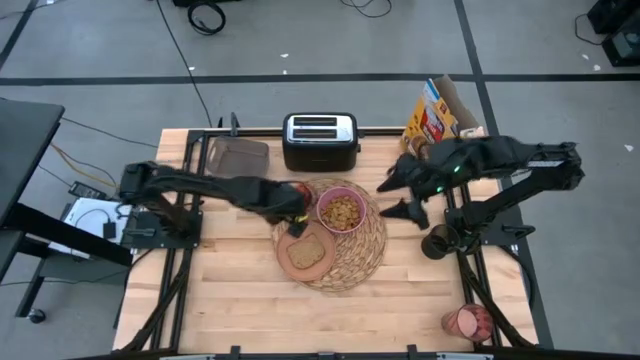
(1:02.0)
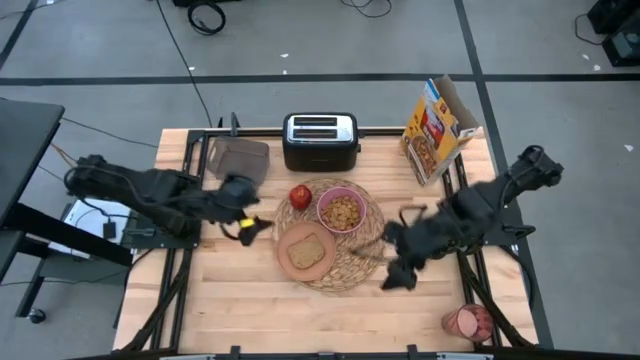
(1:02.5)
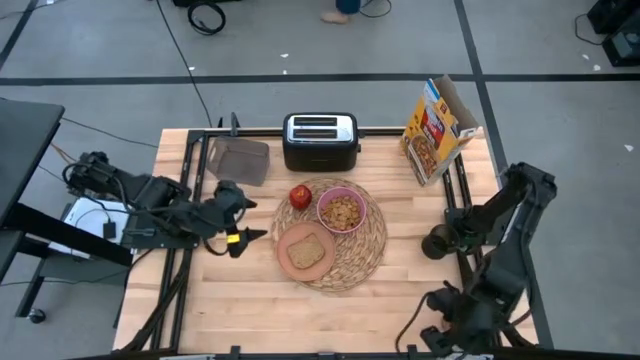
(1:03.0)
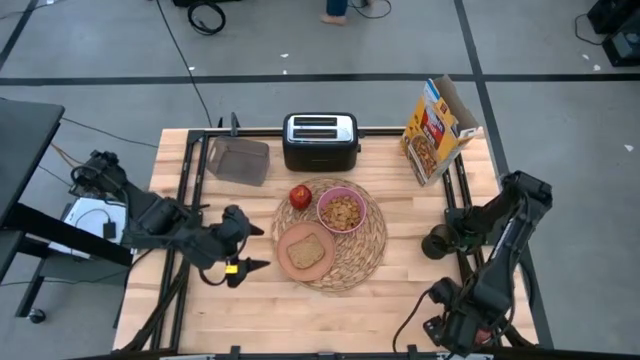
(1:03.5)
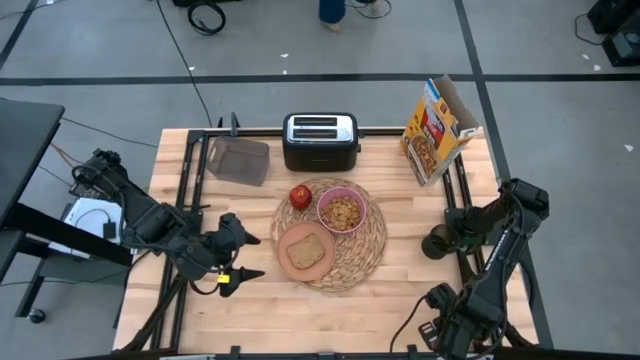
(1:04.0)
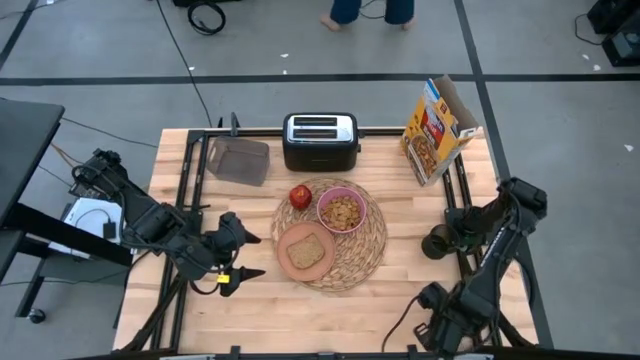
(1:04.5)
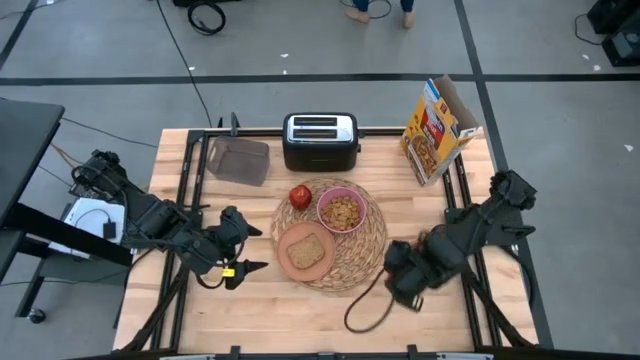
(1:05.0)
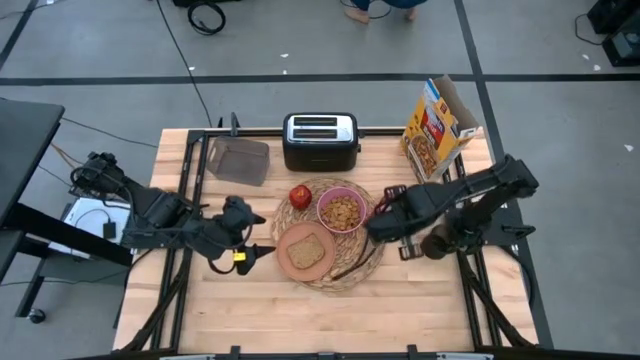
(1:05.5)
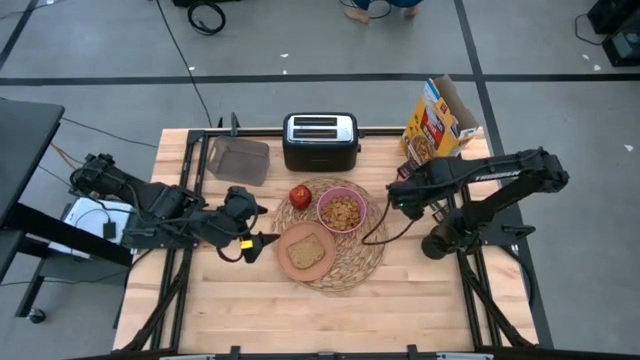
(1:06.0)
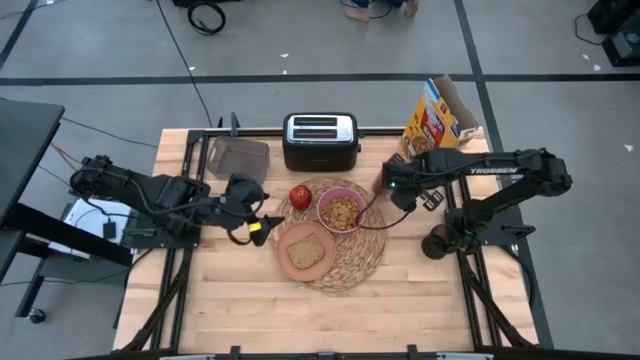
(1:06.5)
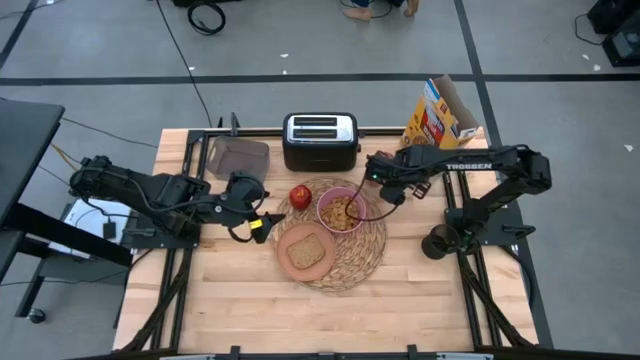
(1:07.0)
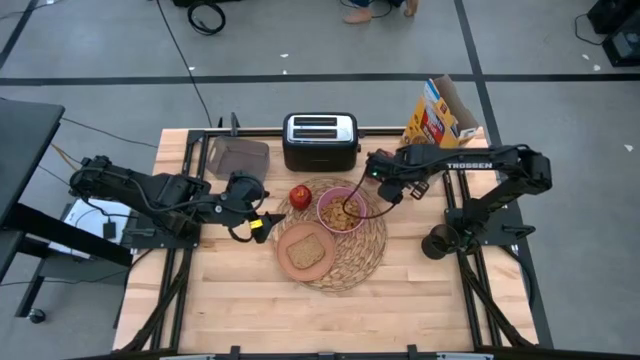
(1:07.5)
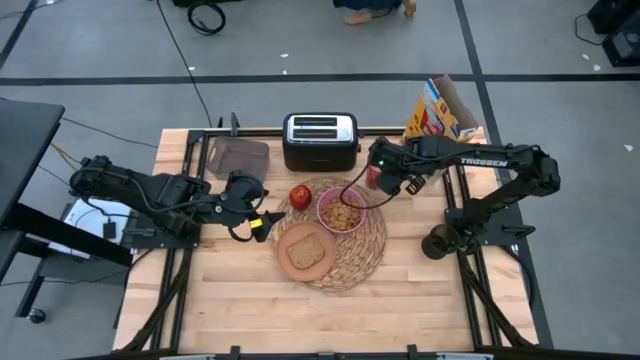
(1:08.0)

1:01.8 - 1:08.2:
Task: Arrange a breakfast setting
Put the red cup to the top right of the brown placemat

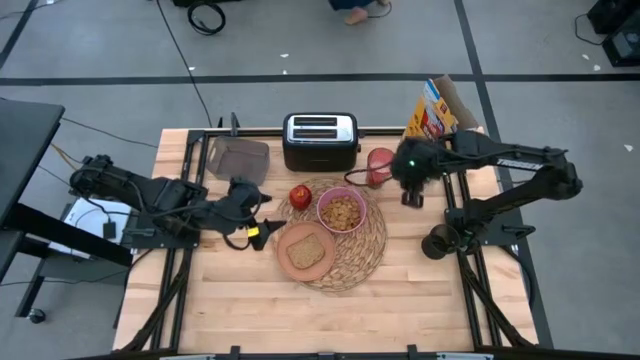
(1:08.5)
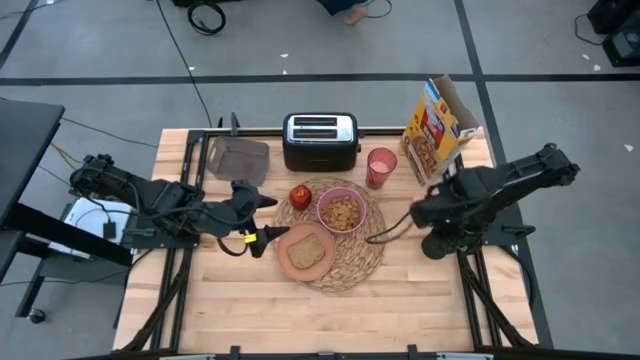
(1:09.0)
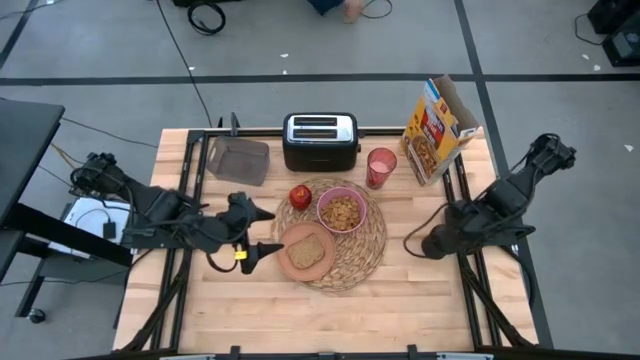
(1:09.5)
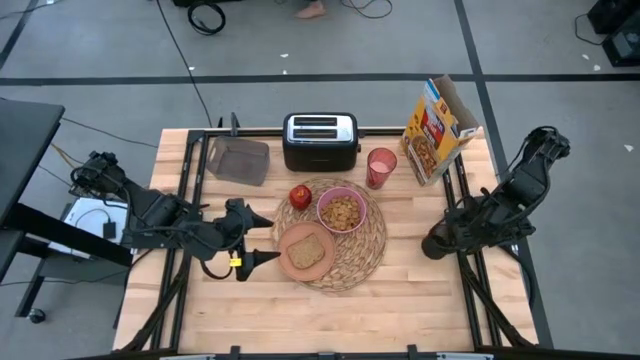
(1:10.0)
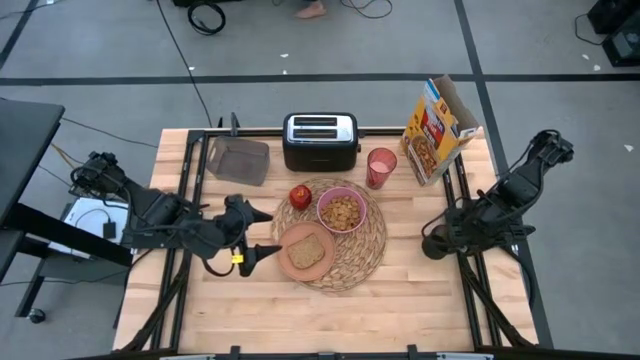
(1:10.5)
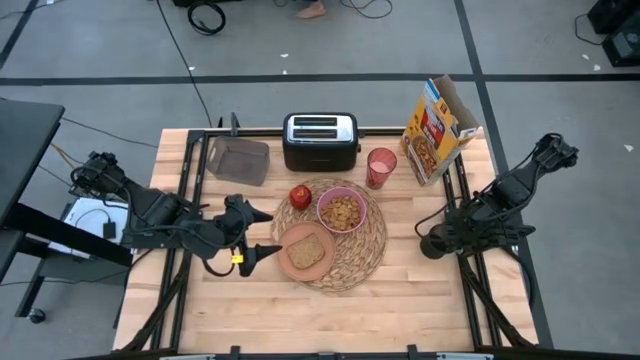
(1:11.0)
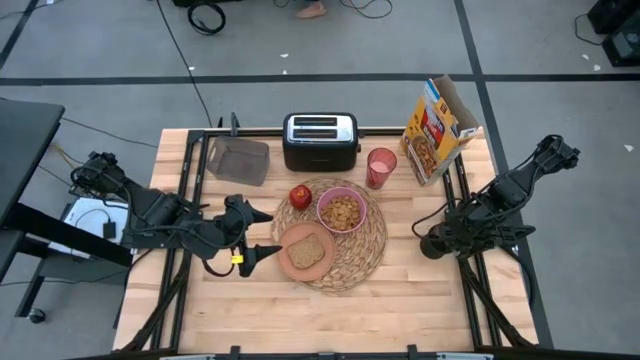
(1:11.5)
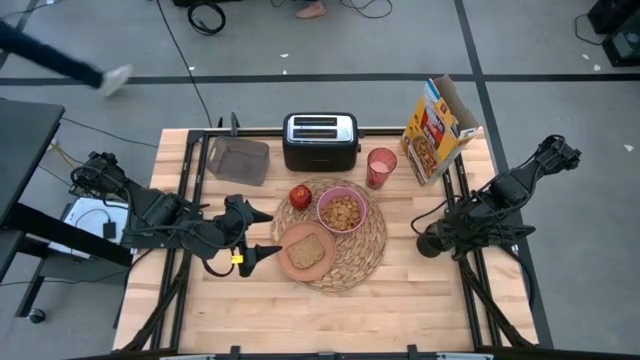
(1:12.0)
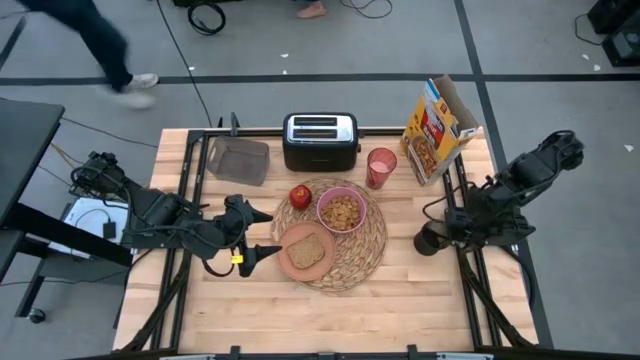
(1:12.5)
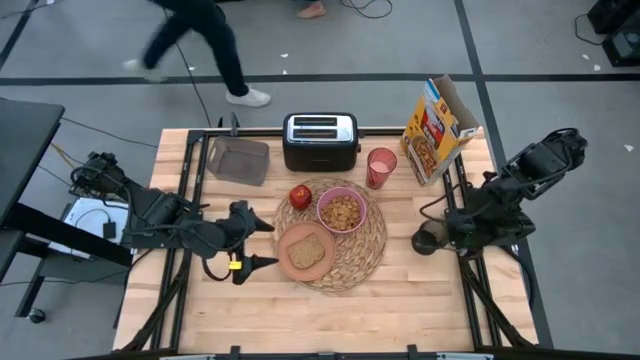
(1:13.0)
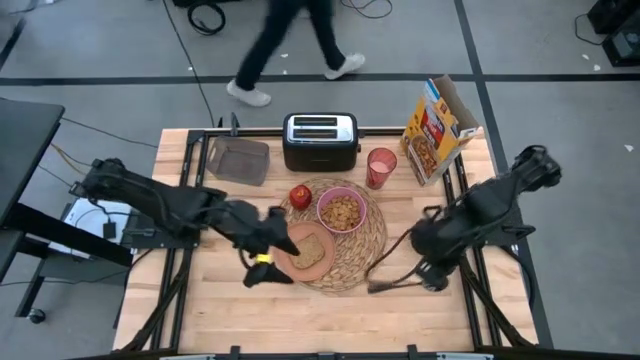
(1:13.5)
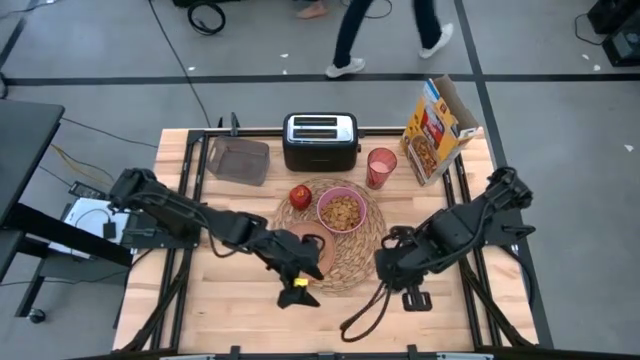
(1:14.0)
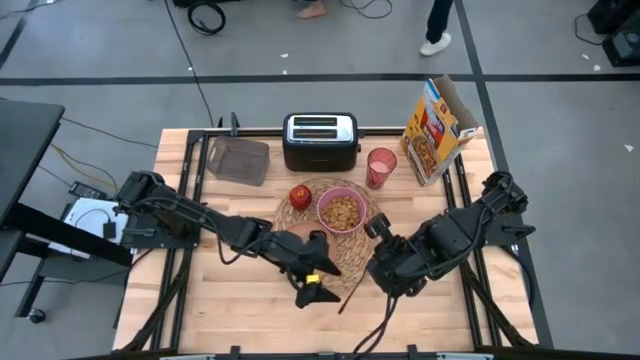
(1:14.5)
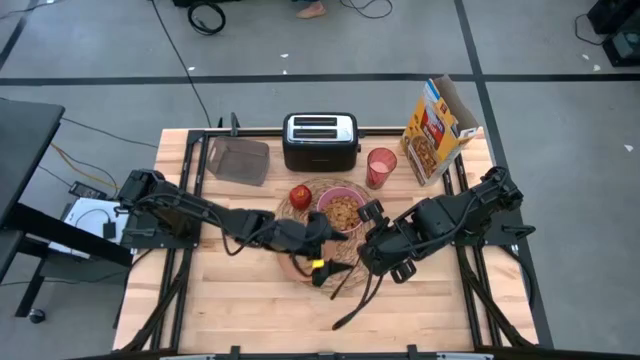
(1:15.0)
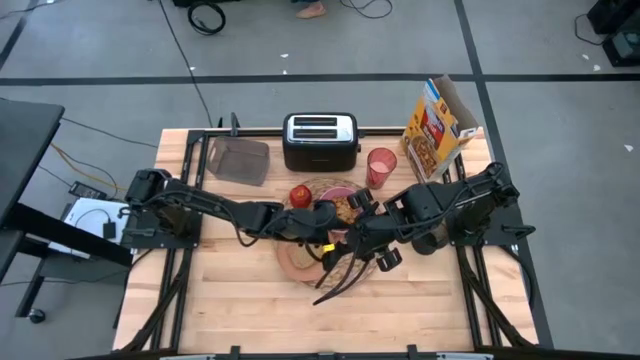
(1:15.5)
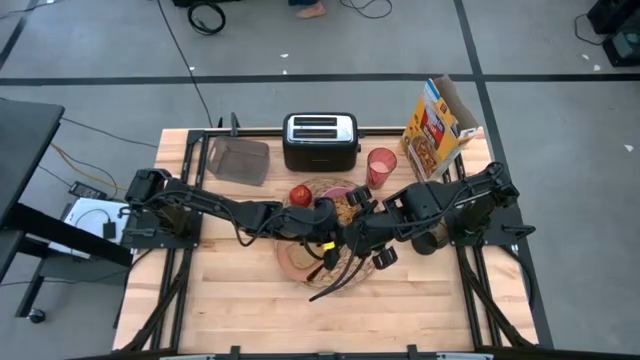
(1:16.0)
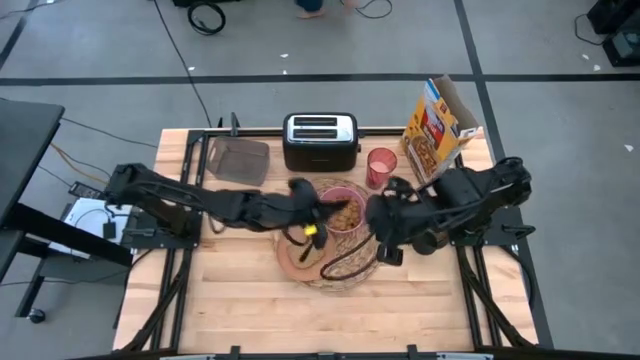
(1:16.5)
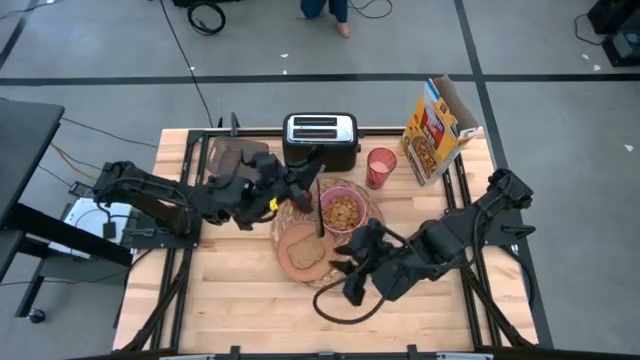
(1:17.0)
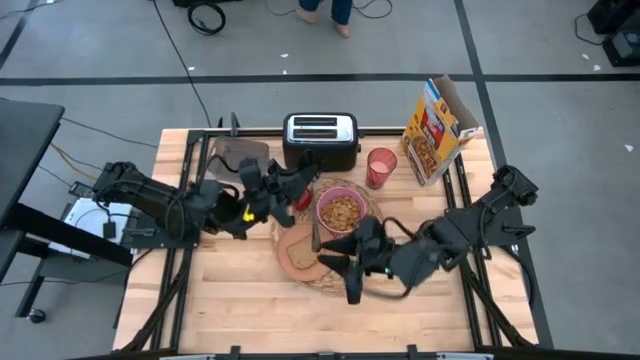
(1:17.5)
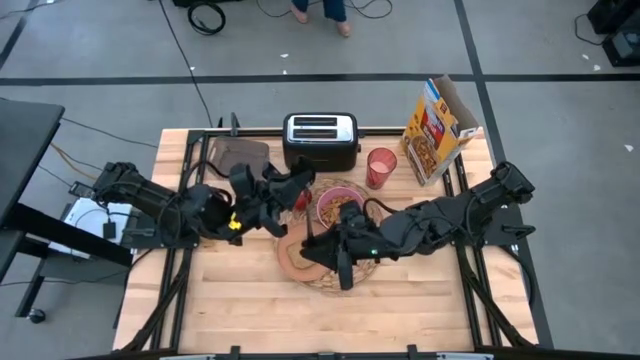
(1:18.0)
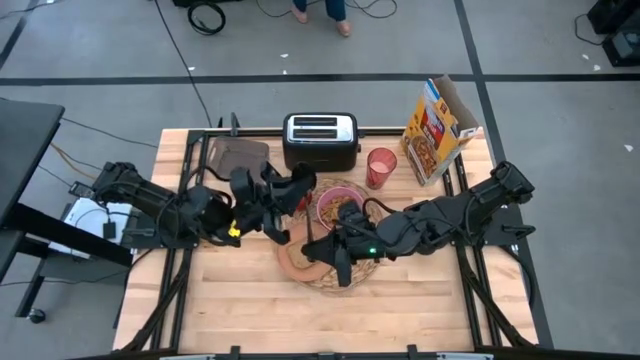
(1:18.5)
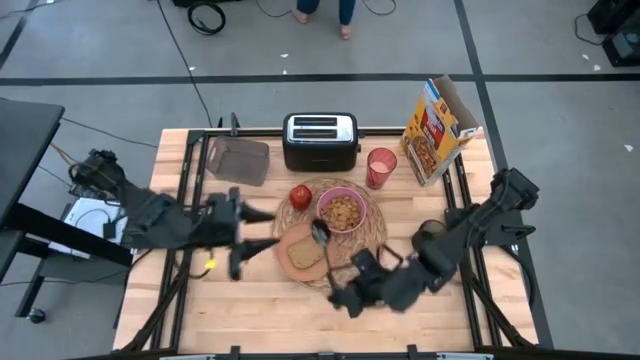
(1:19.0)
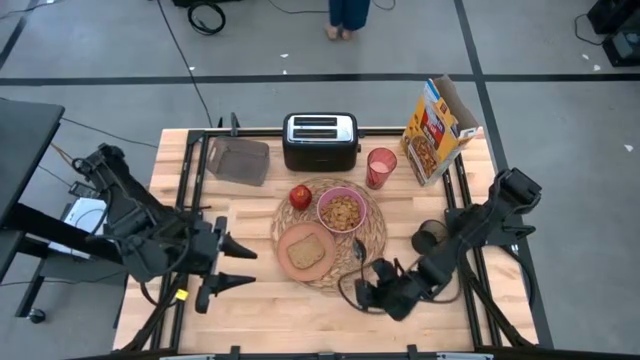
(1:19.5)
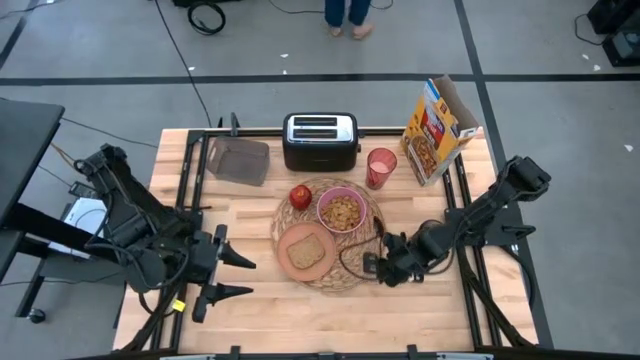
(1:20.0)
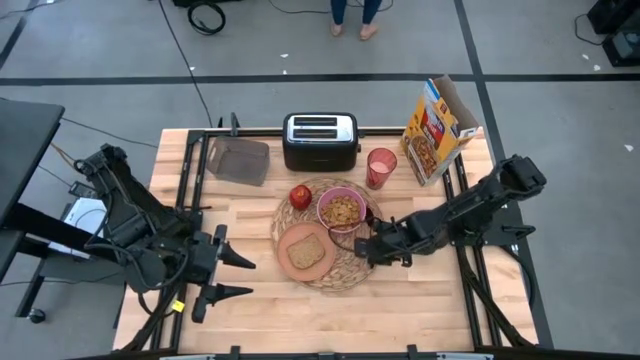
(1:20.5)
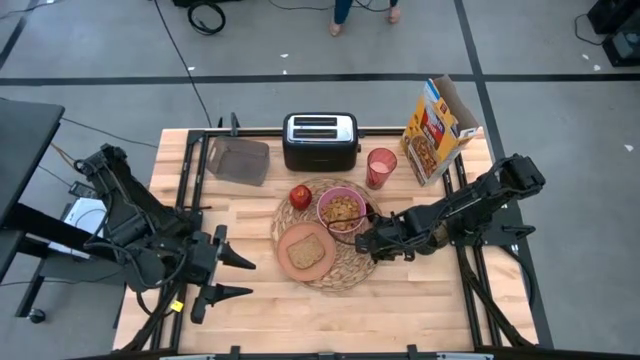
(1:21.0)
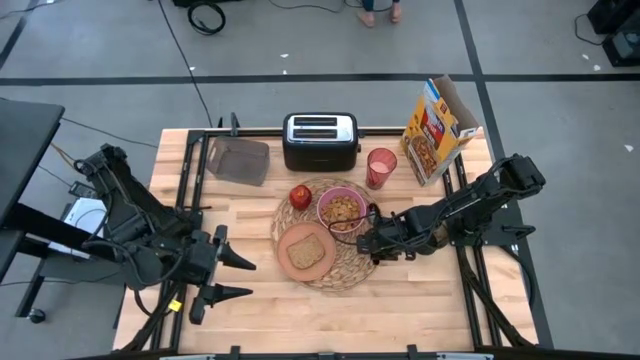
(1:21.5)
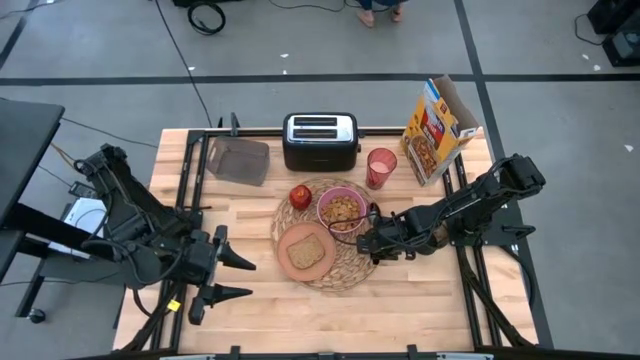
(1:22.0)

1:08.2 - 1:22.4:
Put the black spoon to the right of the pink bowl on the brown placemat

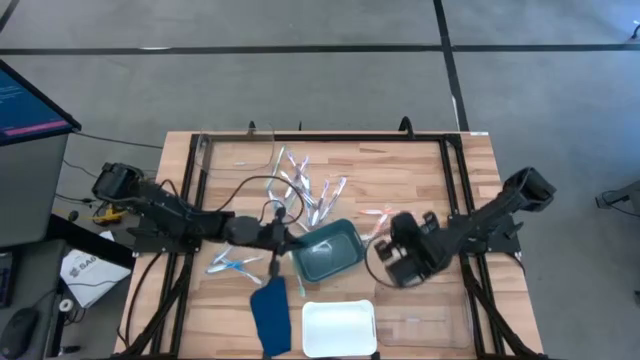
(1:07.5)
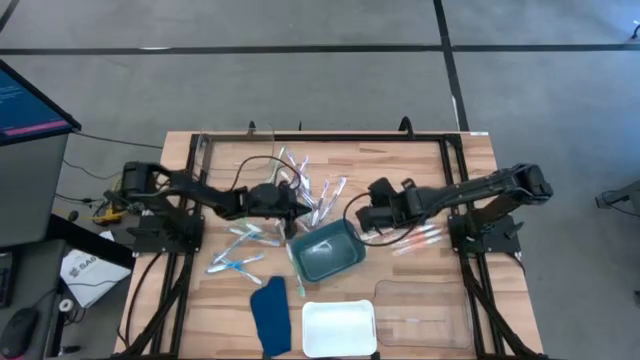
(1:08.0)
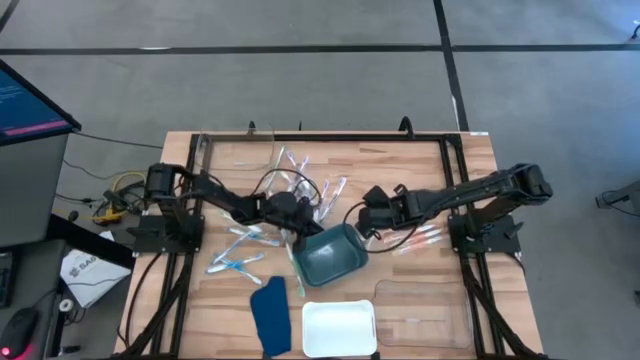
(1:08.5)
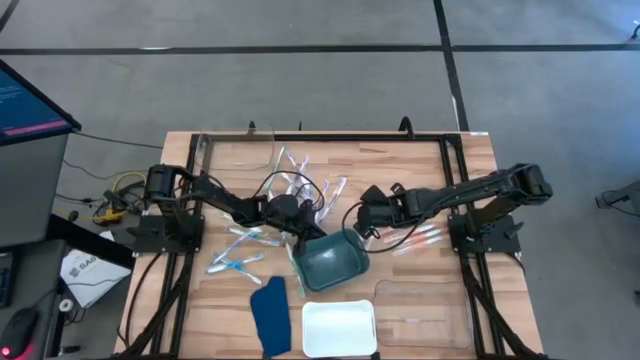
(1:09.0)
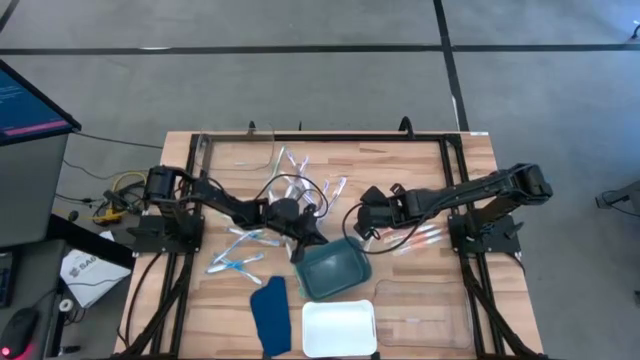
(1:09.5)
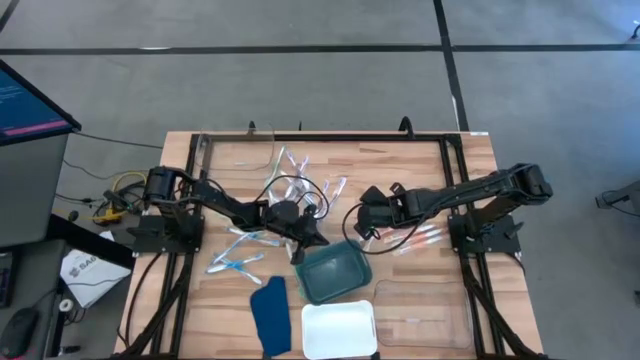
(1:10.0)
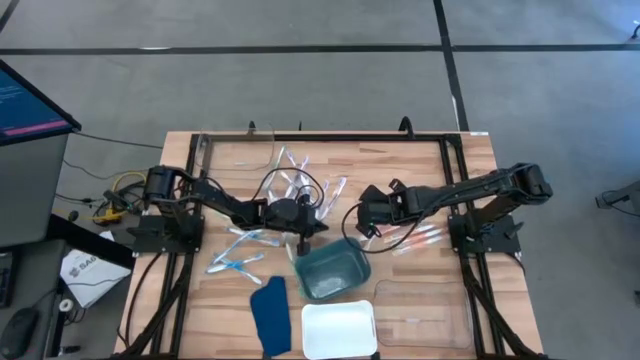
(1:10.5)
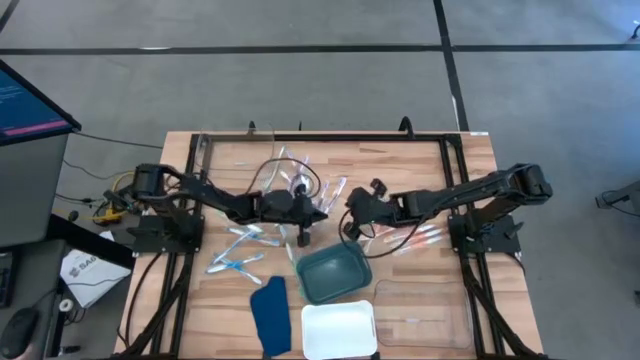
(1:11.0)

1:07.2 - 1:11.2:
Task: Pick & Place Toothbrushes
Adjust the green bin
